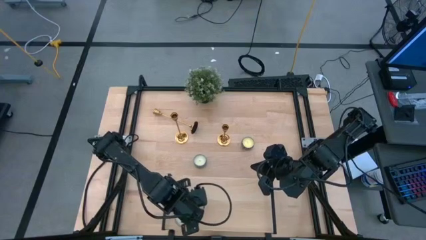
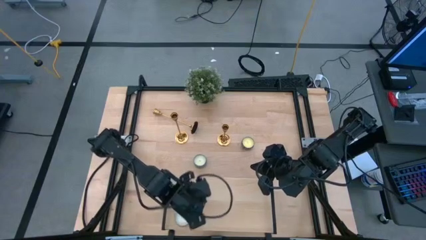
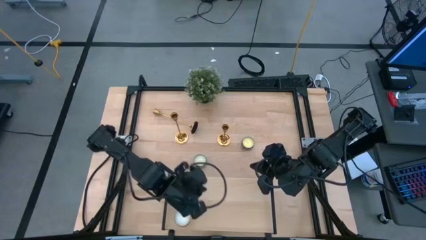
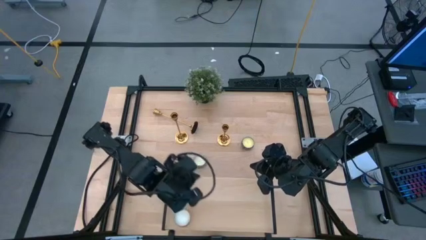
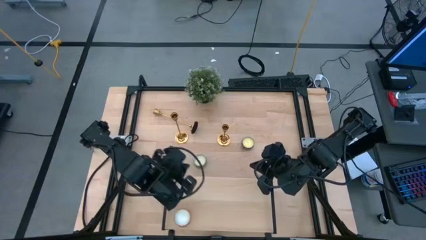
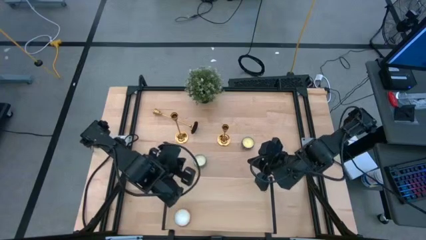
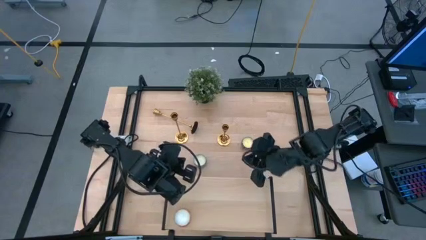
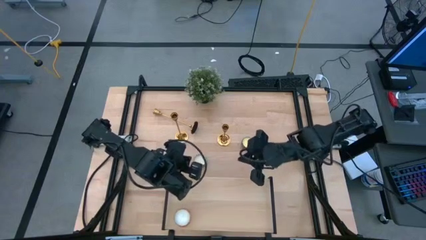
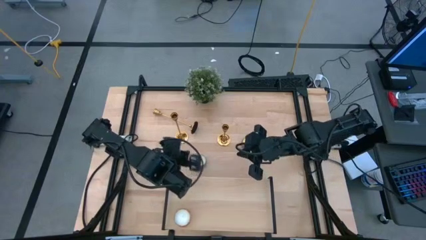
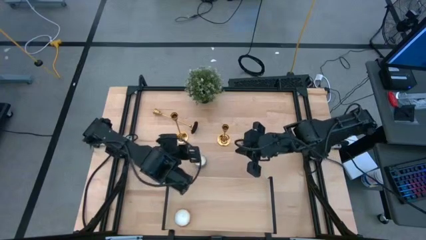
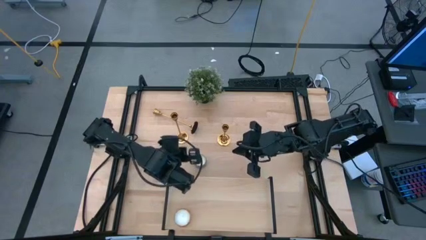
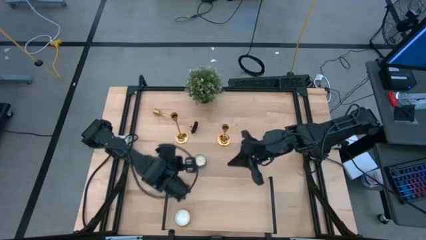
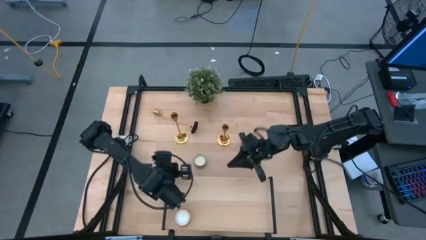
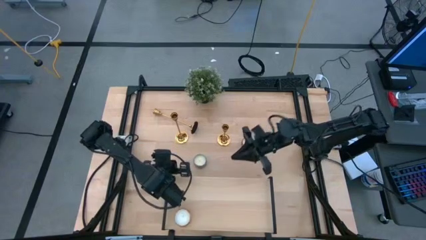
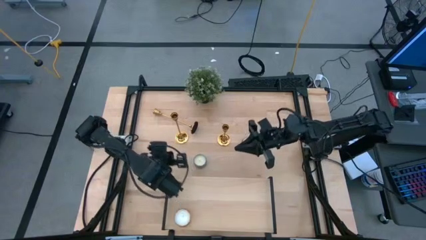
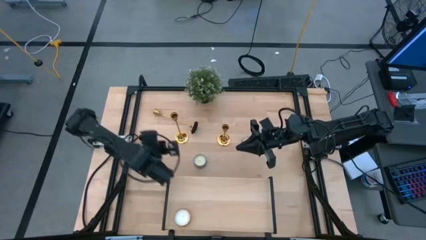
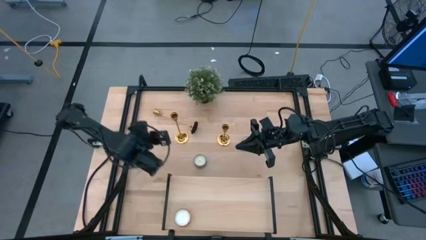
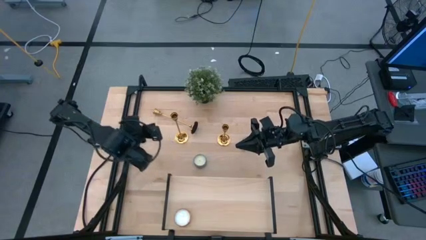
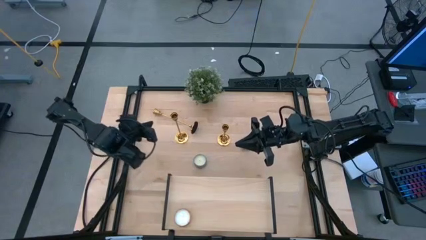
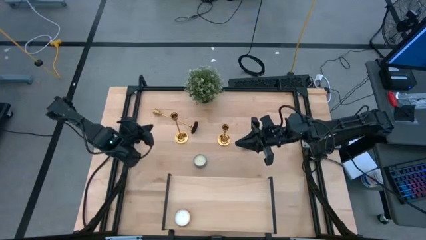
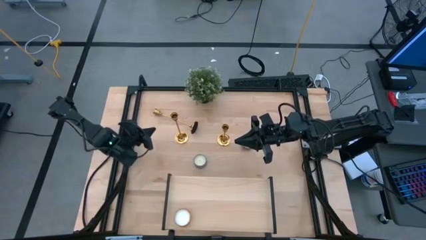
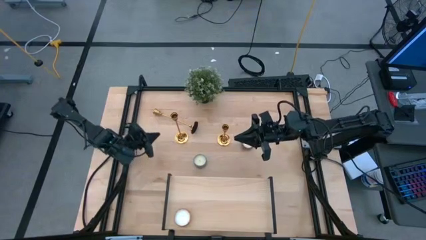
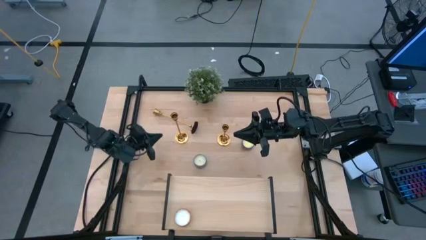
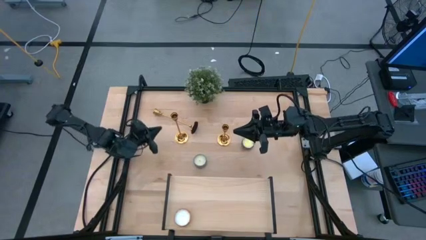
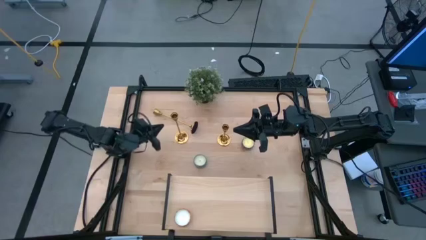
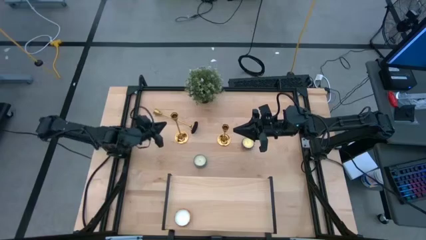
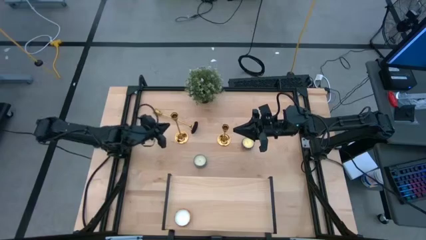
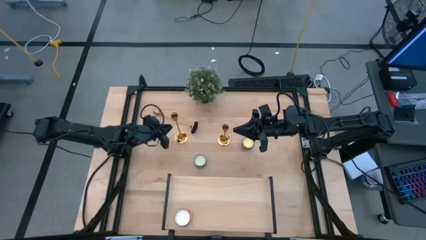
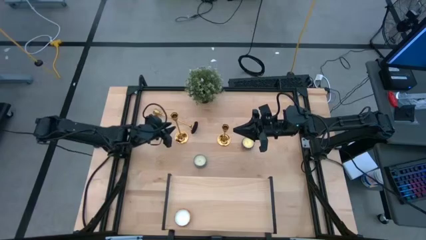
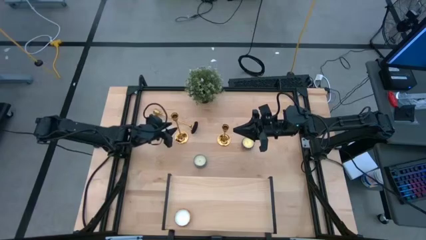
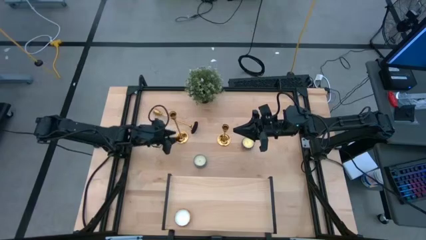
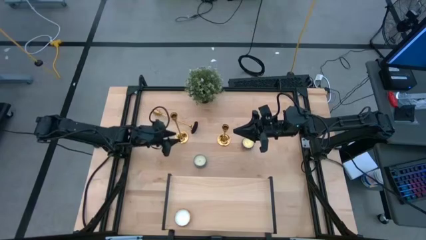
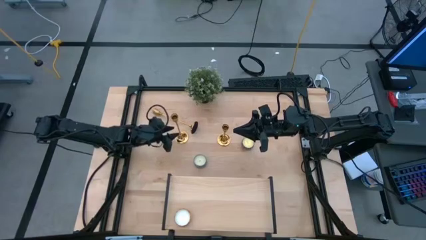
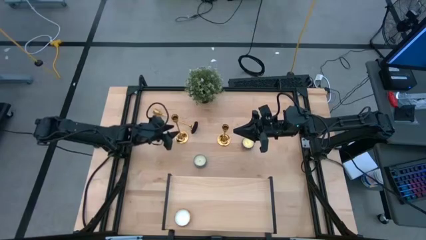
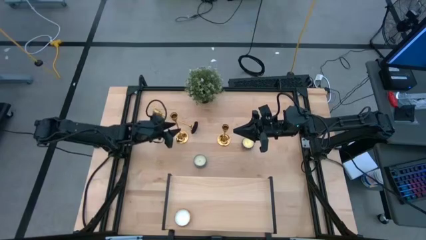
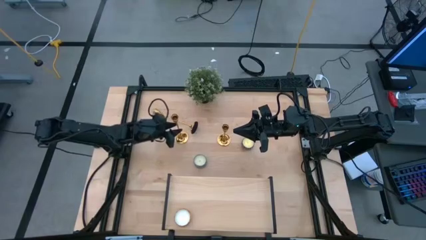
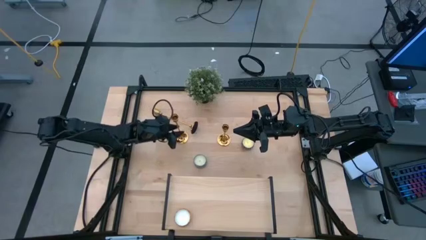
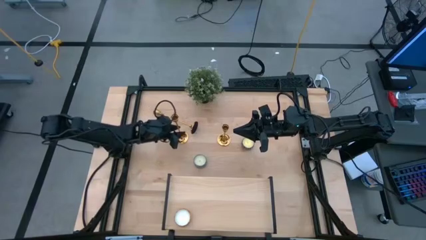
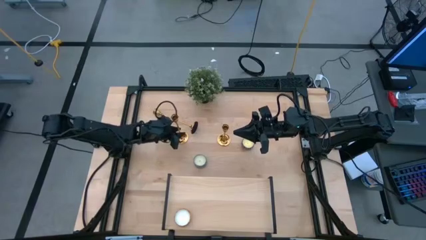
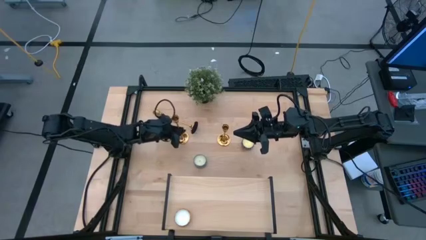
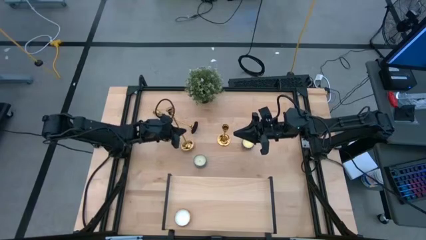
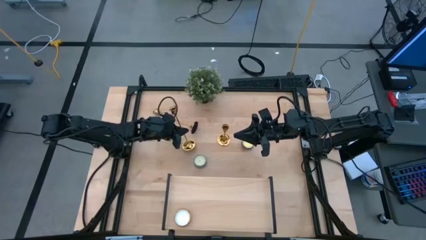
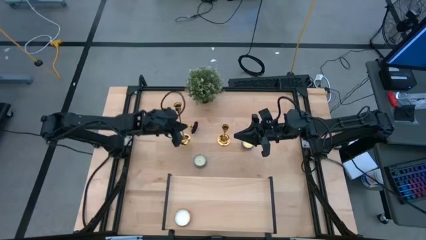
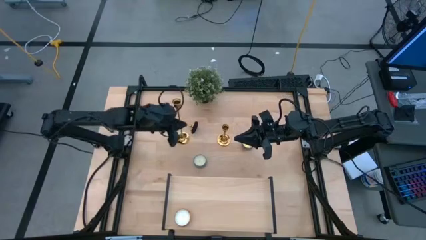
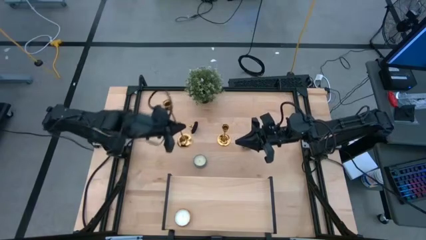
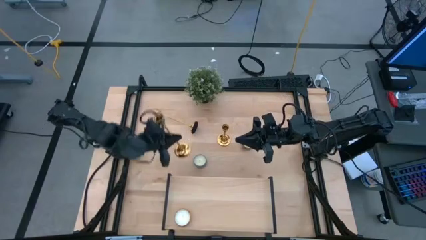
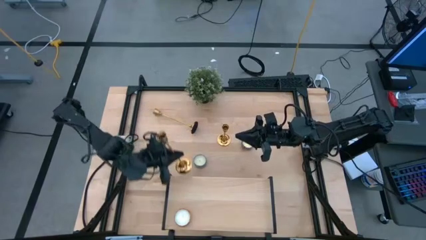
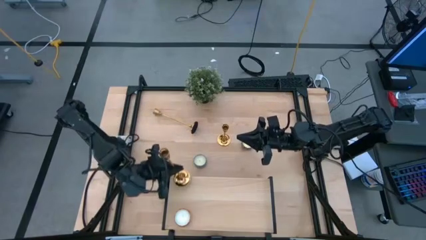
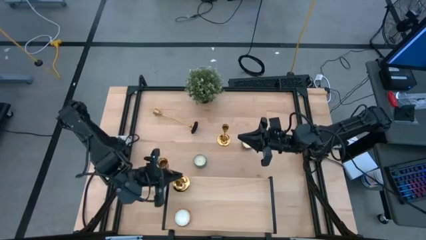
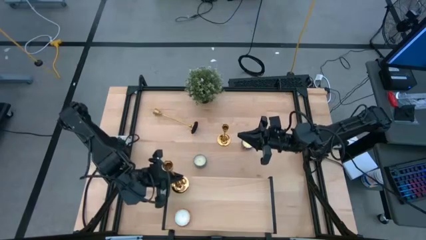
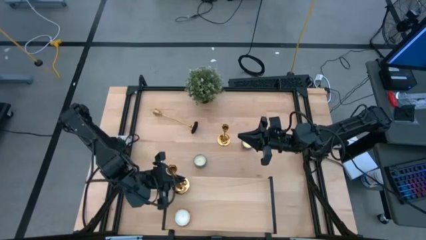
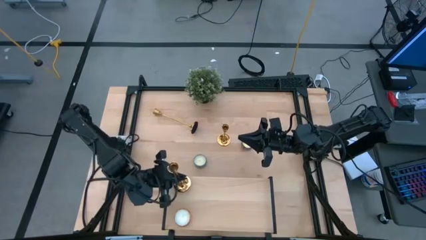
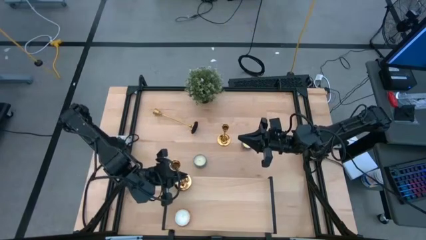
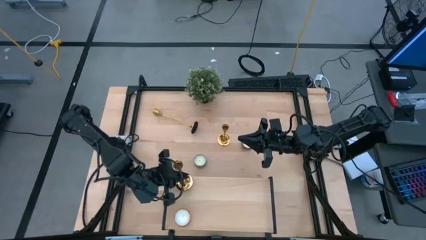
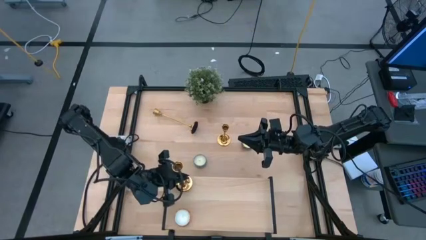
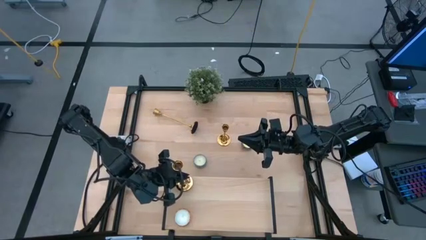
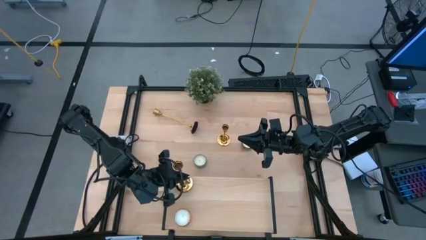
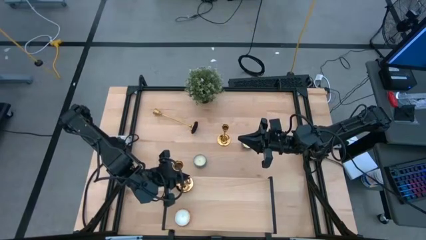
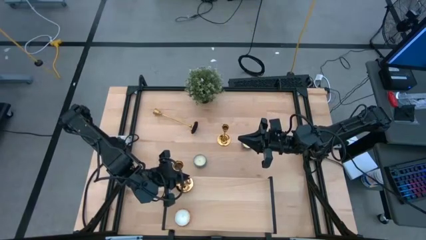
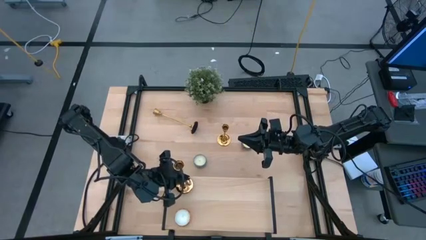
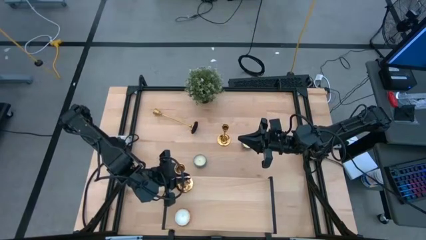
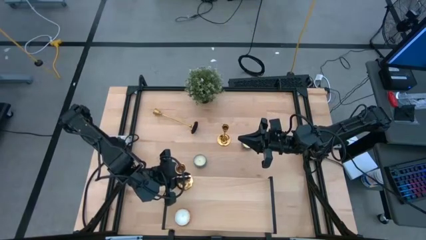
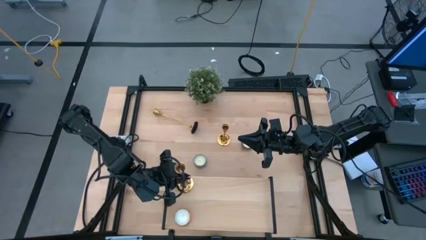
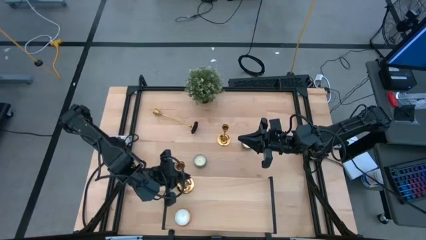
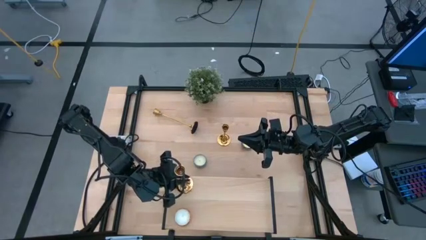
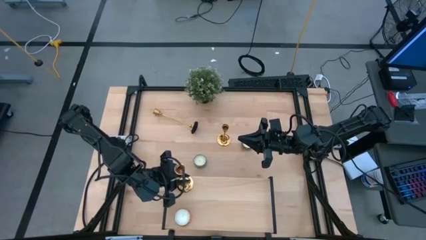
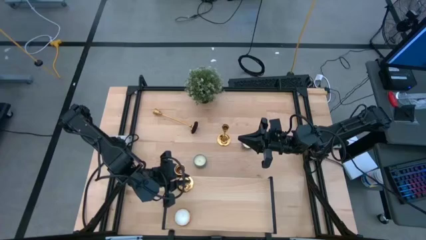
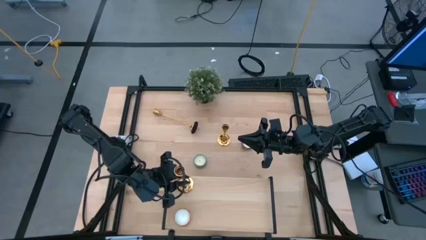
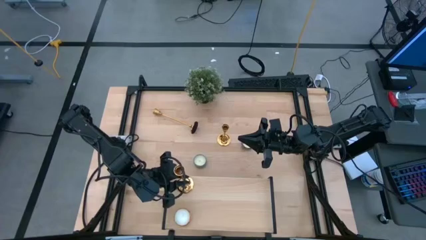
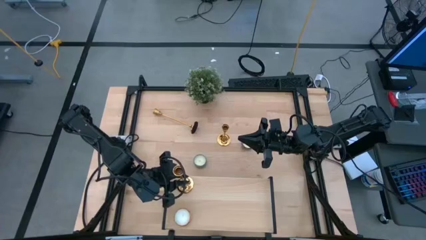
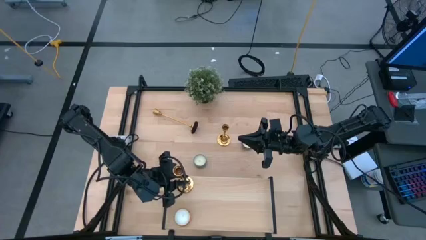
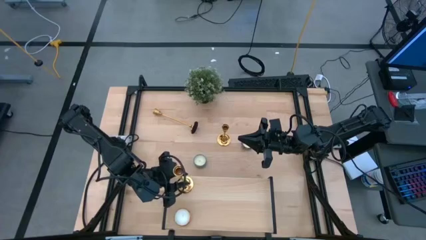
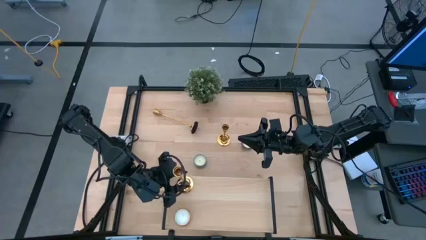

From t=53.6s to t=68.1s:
Task: Pick & Place candle stick holders
Put the bottom left gold candle stand on the shelf

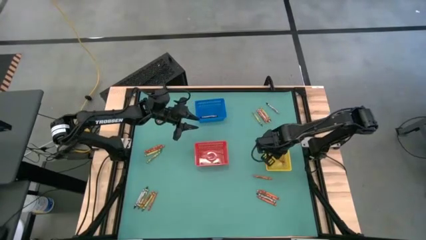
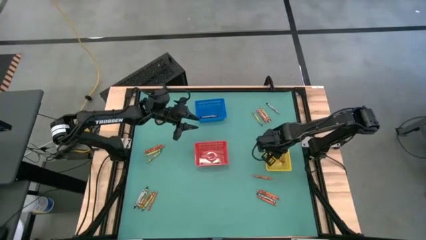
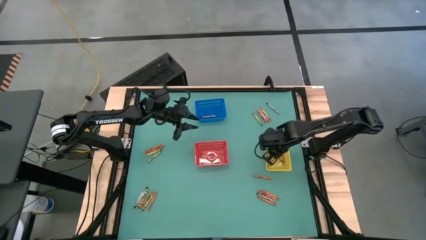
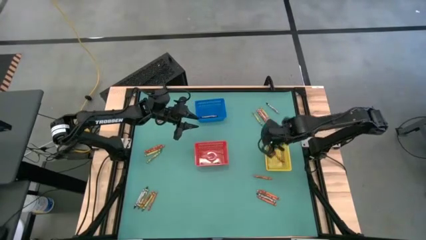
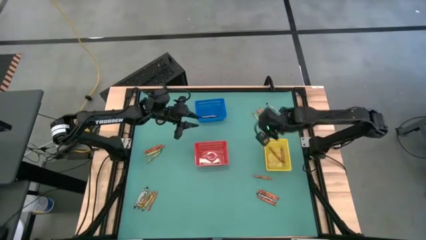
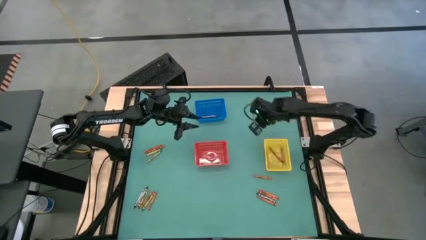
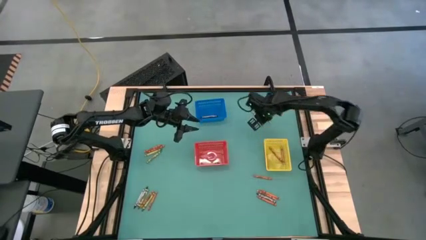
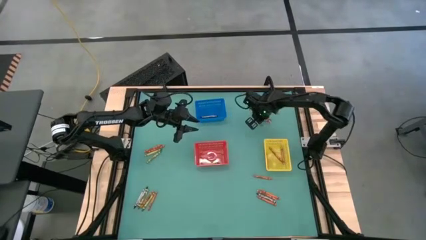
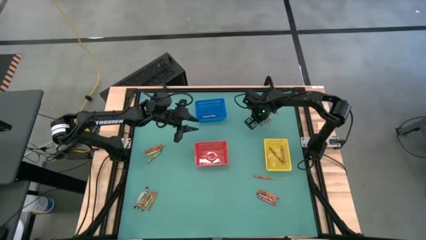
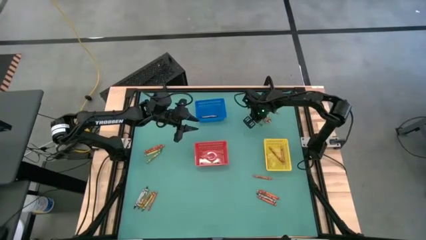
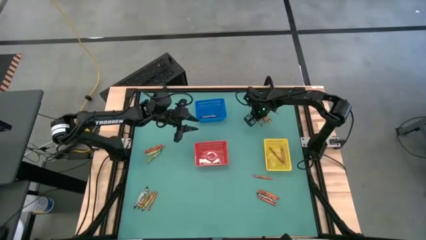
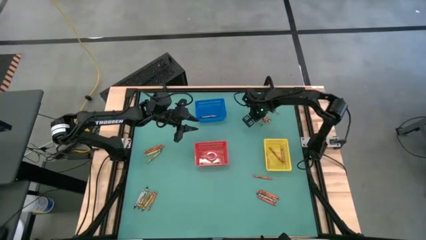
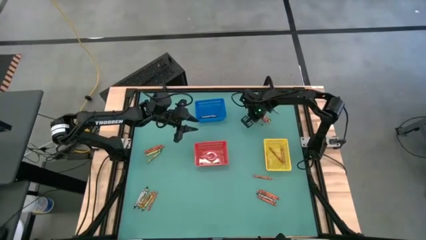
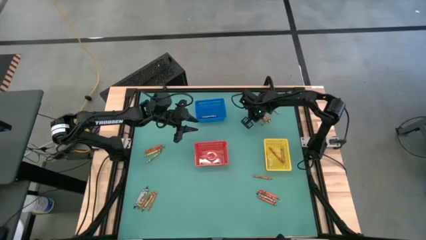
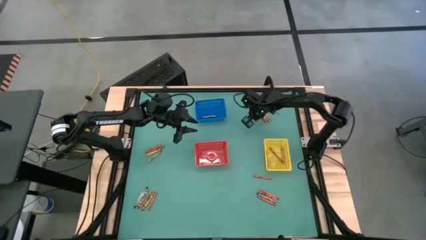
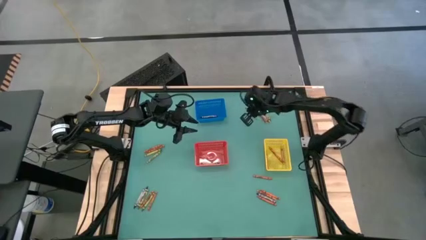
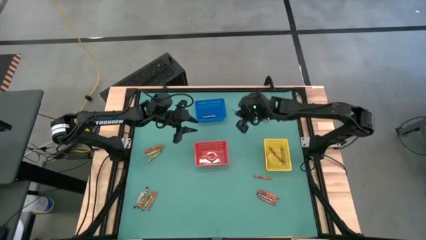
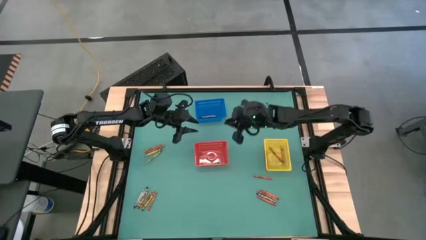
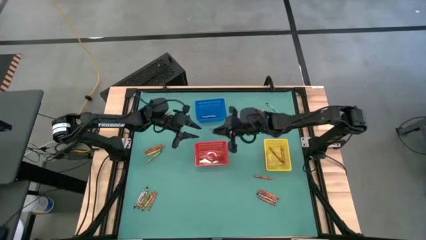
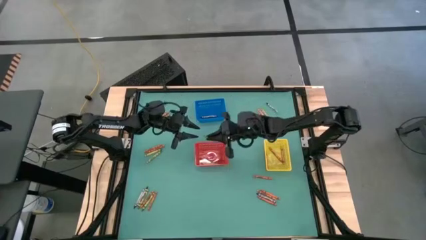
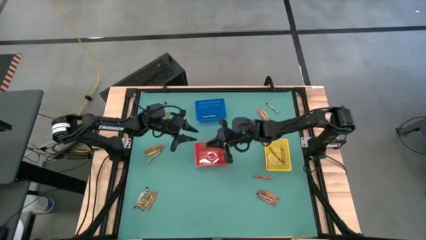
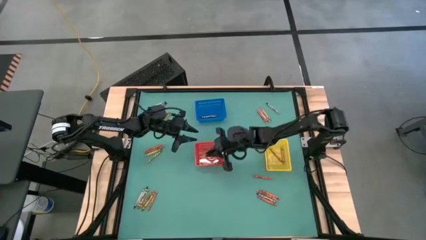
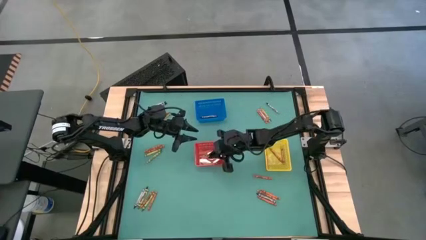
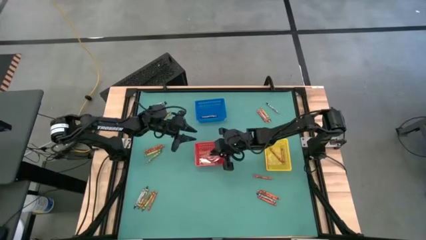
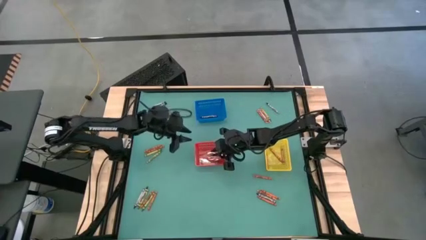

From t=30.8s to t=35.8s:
Task: Sort crayons
Put the green crayon into the red bin
